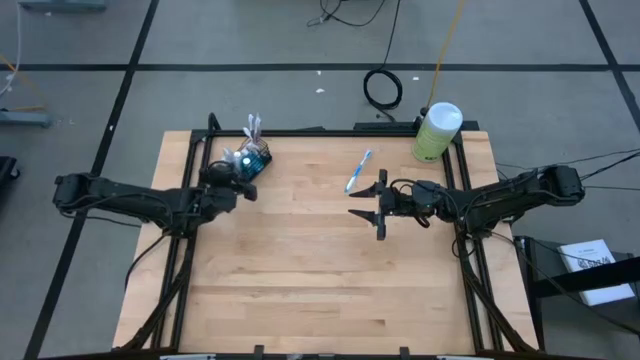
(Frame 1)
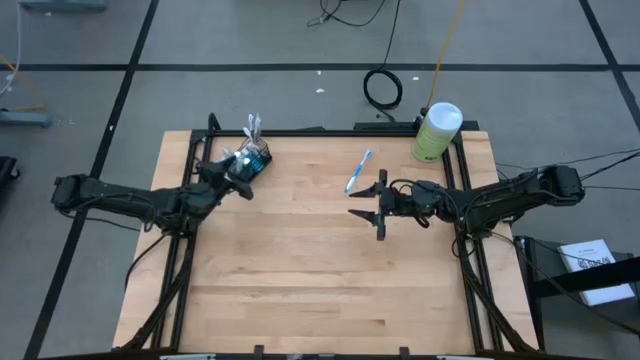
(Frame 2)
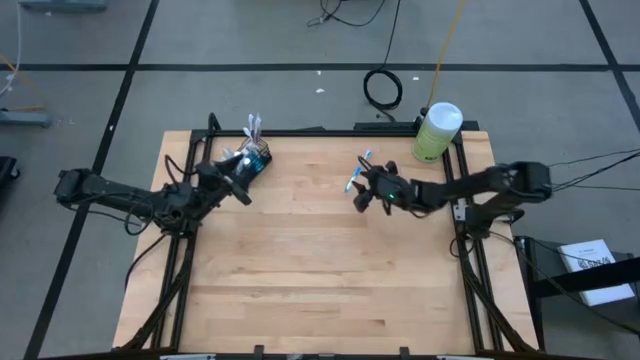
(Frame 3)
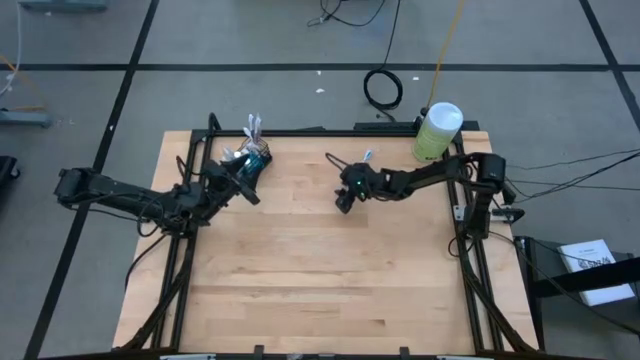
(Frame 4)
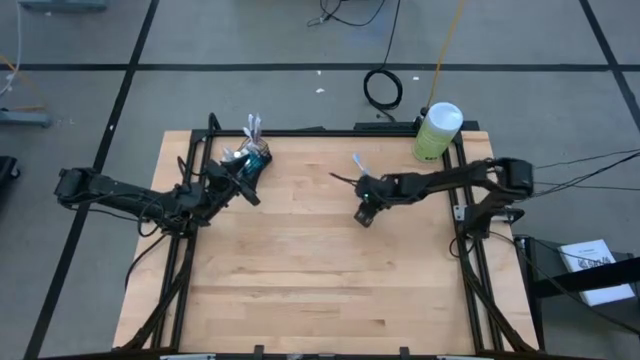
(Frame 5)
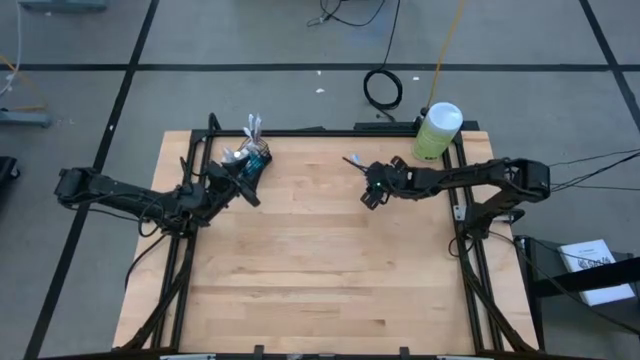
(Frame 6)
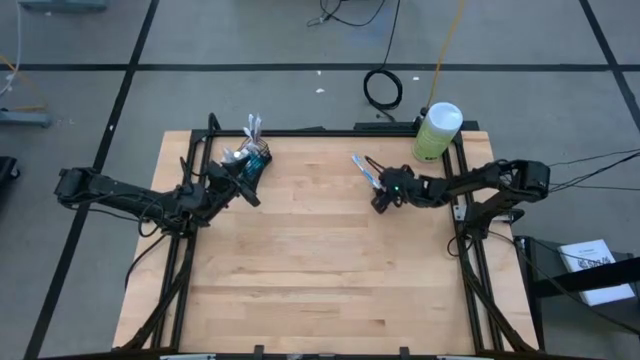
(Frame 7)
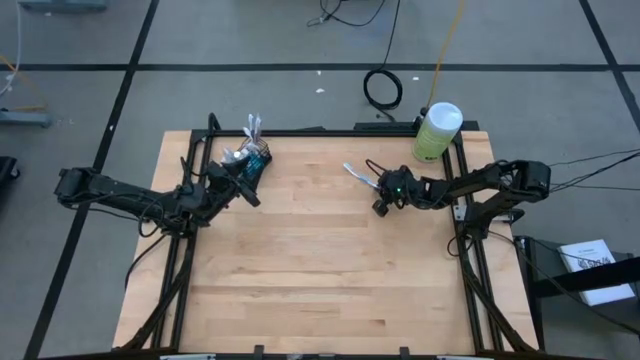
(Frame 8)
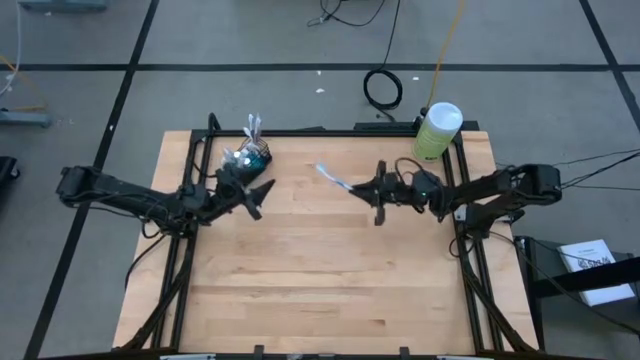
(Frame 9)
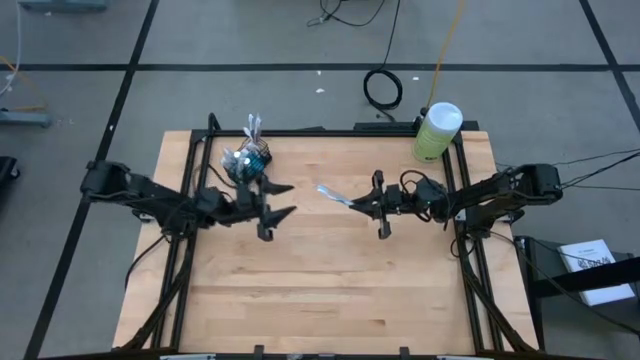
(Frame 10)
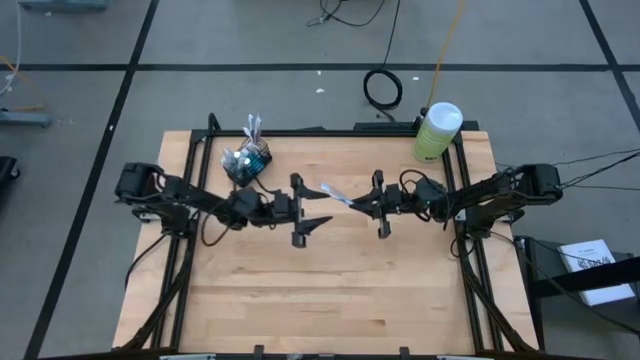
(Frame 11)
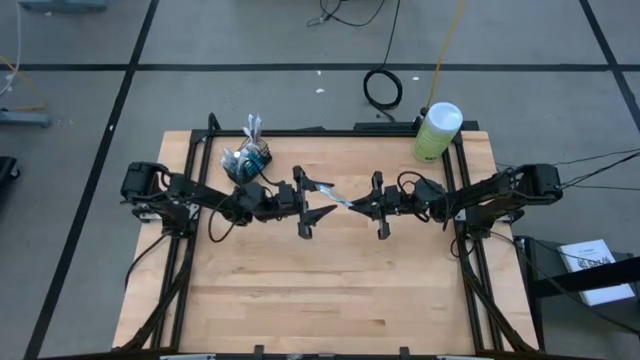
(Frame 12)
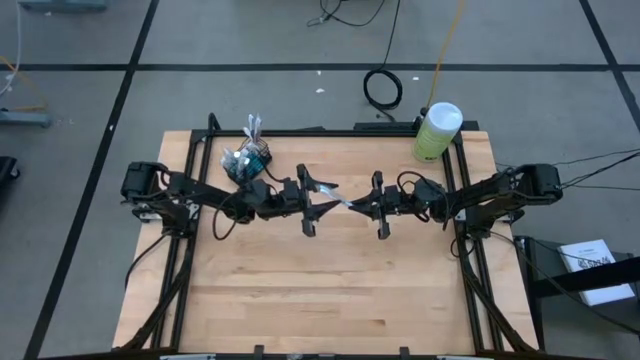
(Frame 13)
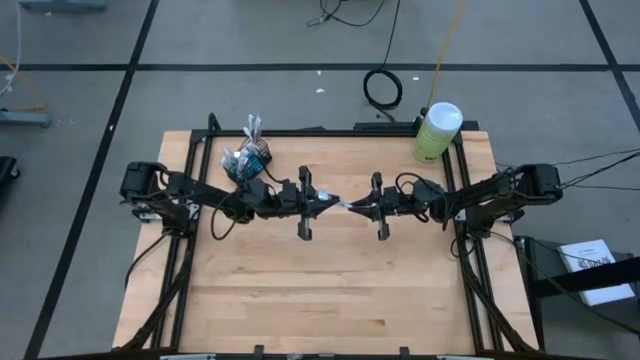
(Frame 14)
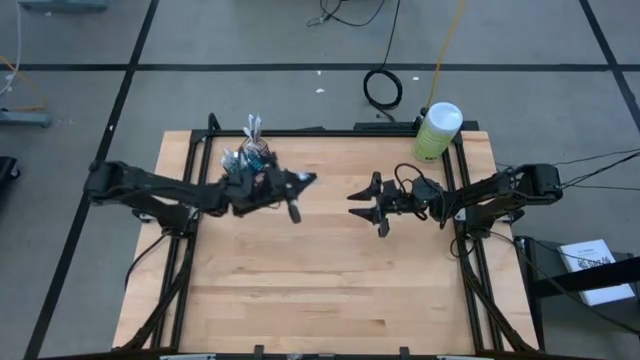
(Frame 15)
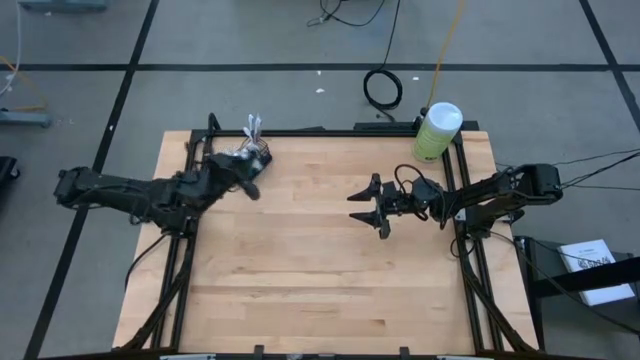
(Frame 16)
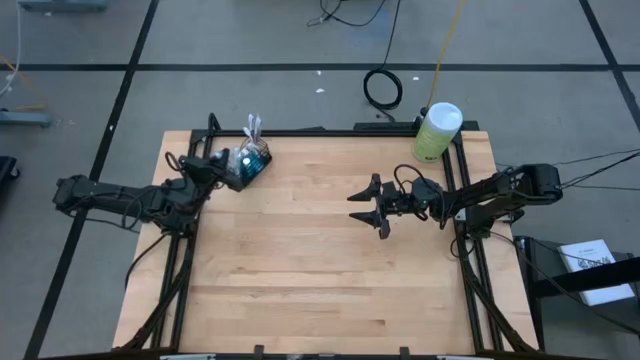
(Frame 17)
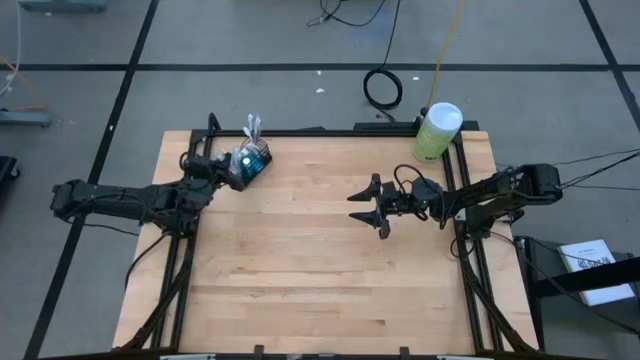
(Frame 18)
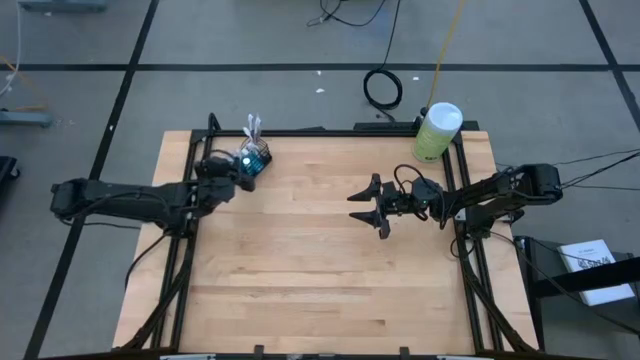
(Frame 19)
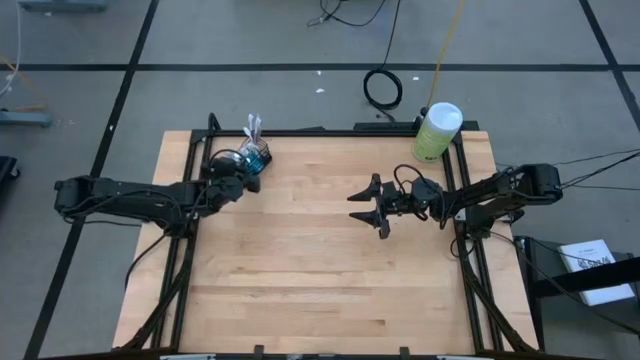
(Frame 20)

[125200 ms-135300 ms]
Task: Pick & Place toothbrushing station
Put the blue toothbrush into the left compartment of the wire organizer

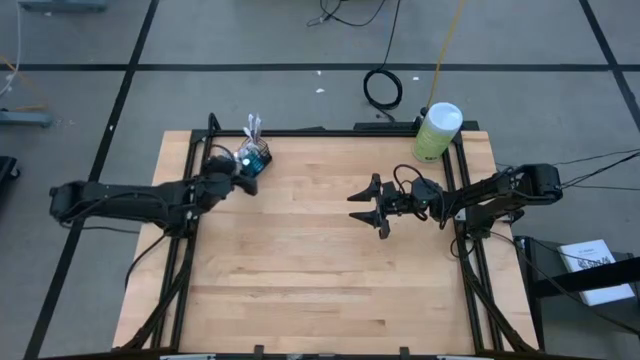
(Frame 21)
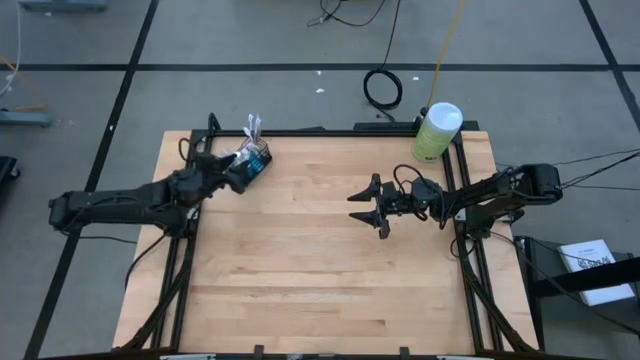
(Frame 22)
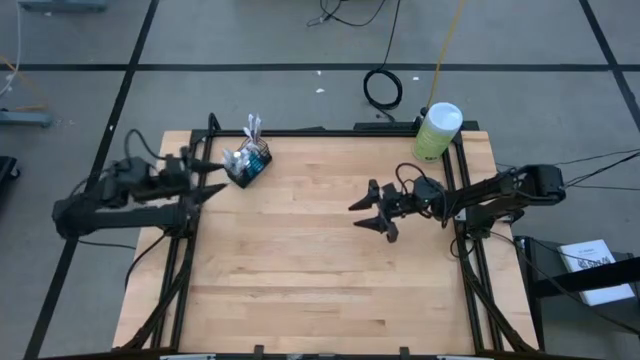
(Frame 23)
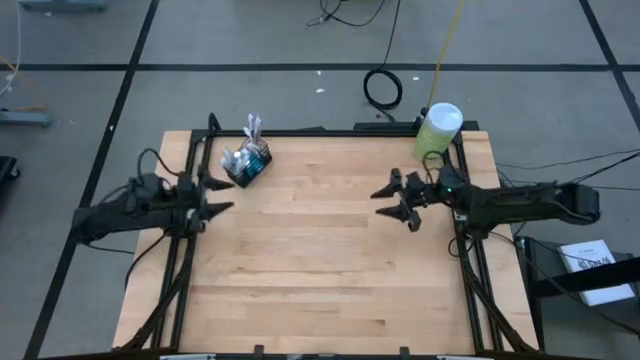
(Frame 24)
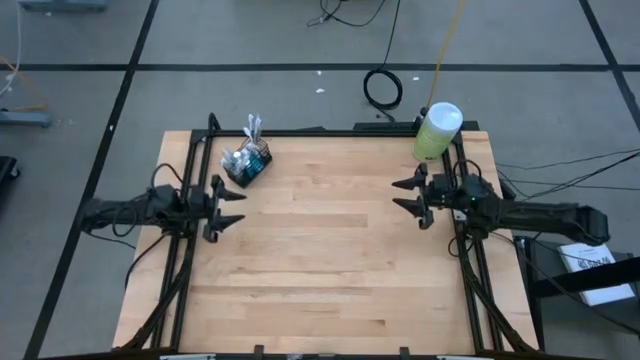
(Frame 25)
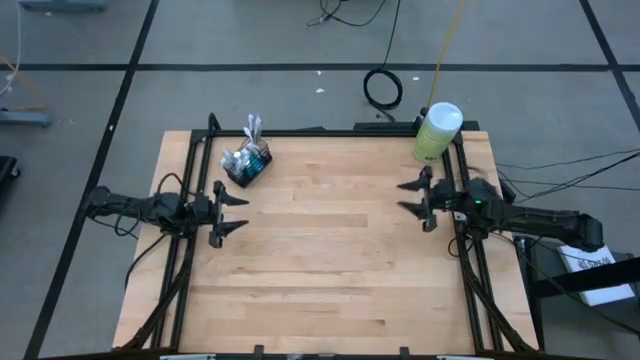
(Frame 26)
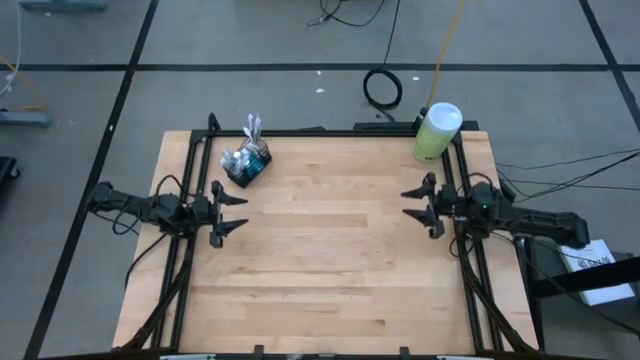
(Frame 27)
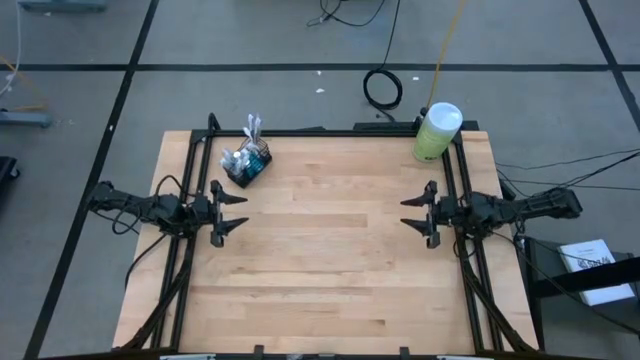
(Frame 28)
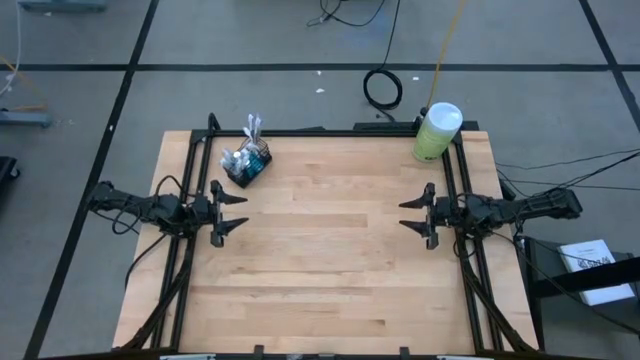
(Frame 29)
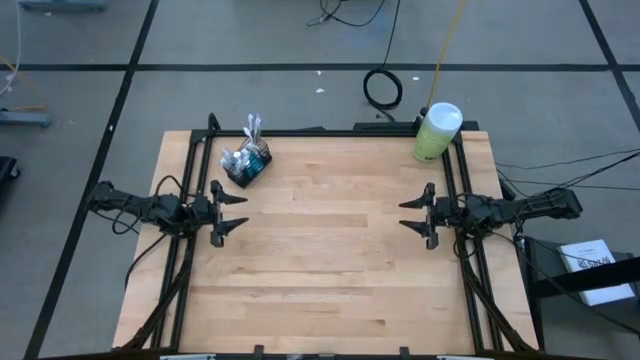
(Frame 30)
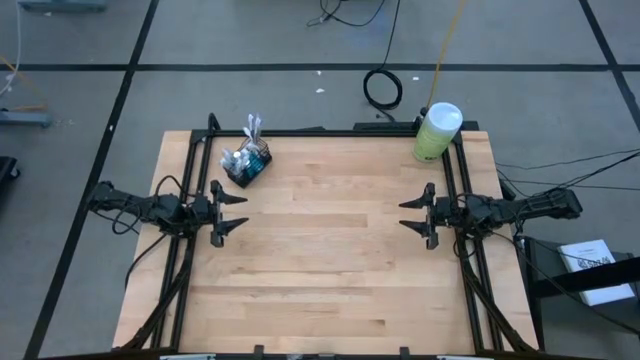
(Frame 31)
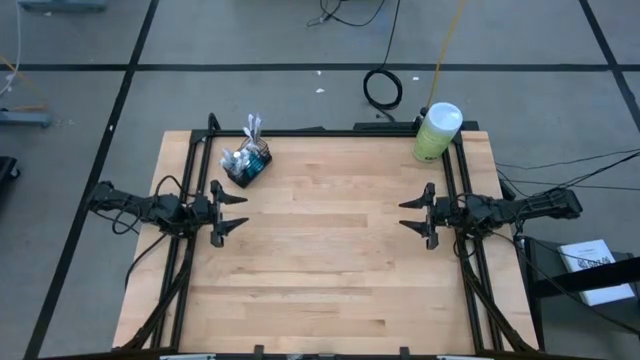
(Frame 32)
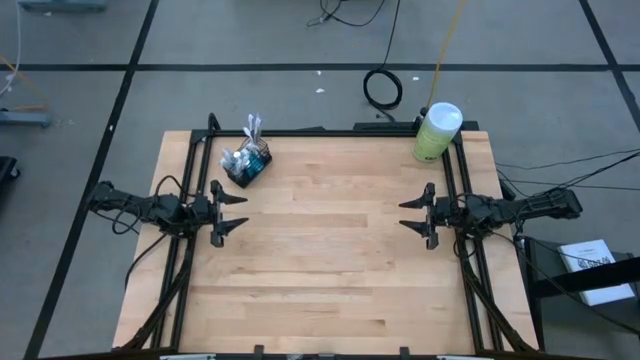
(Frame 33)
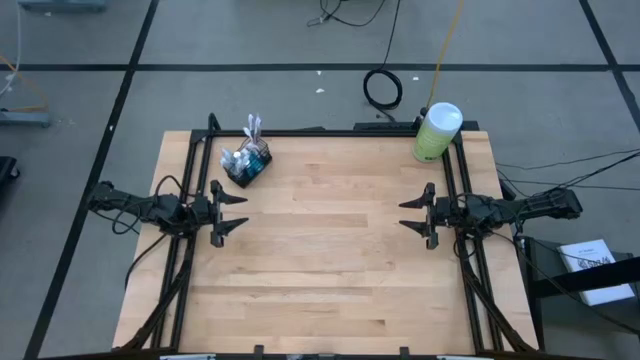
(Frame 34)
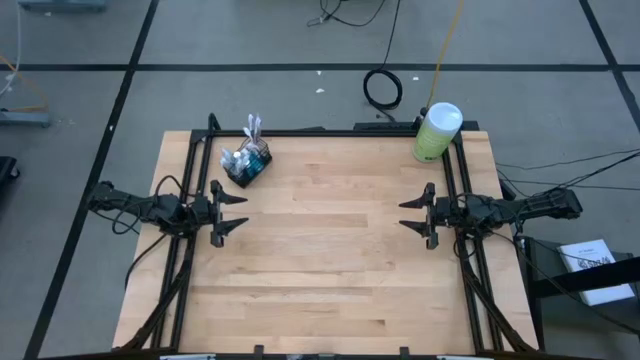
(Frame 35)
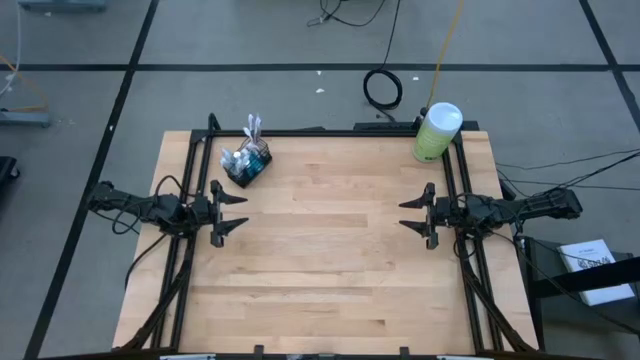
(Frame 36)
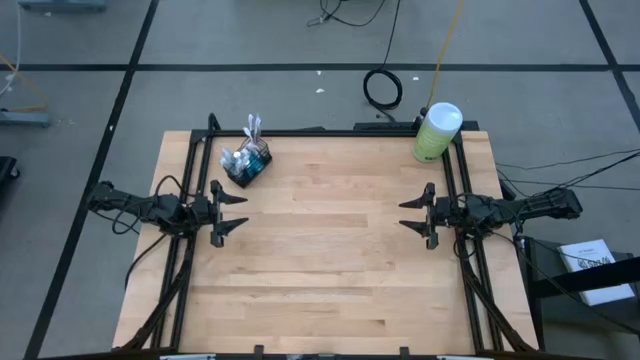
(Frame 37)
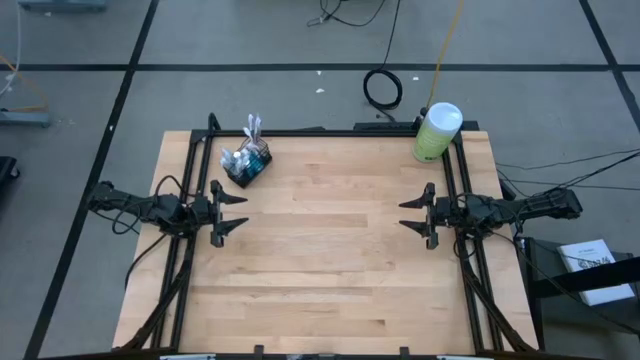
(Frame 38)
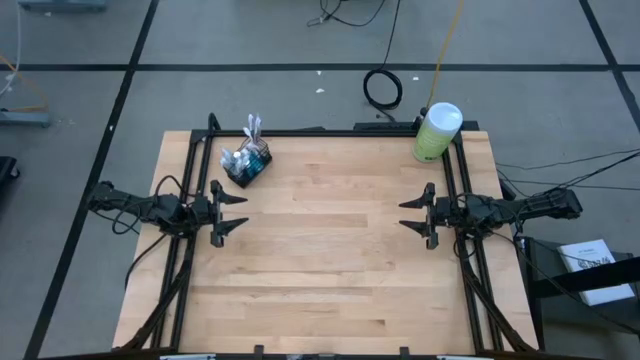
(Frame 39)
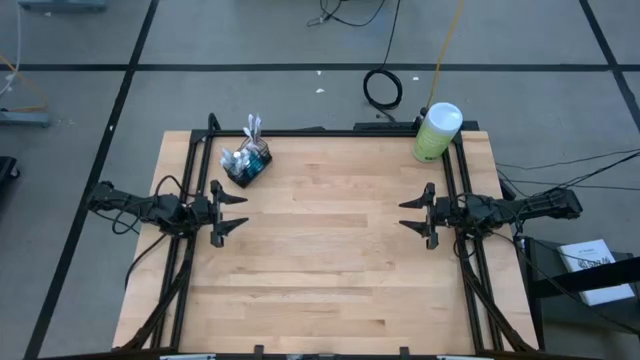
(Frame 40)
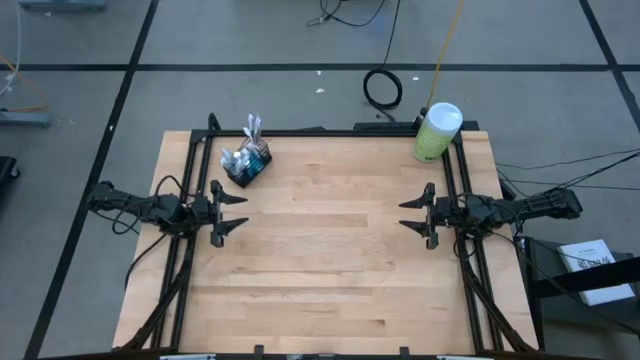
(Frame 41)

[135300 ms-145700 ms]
Return to Home Position
